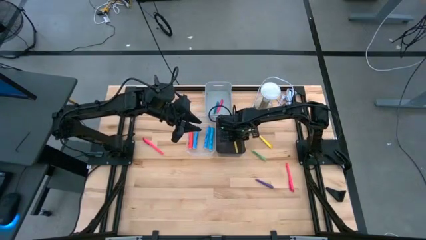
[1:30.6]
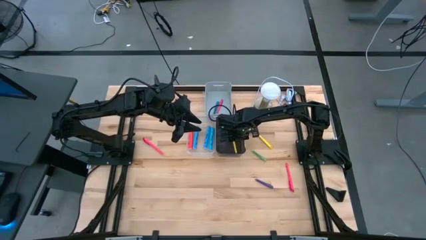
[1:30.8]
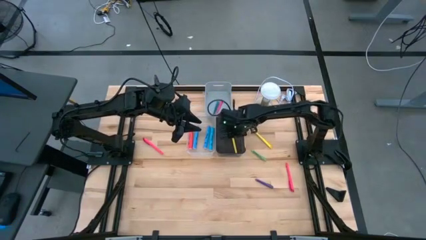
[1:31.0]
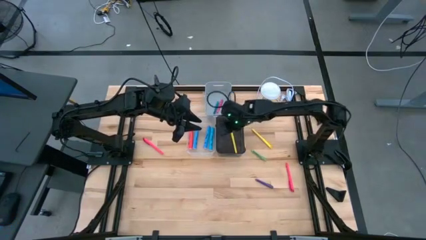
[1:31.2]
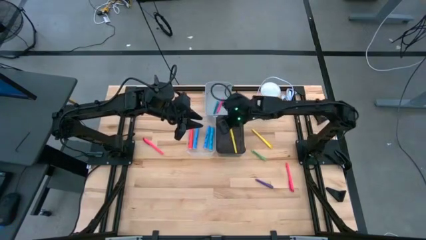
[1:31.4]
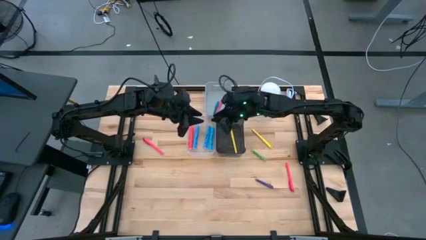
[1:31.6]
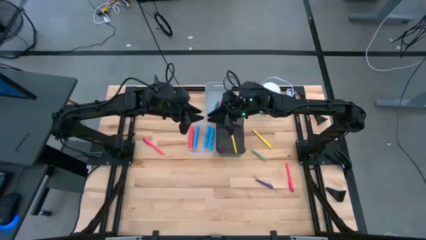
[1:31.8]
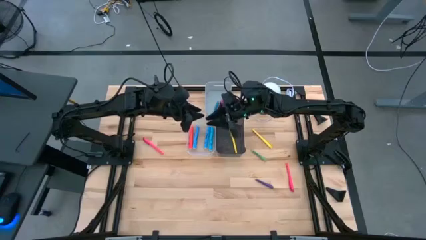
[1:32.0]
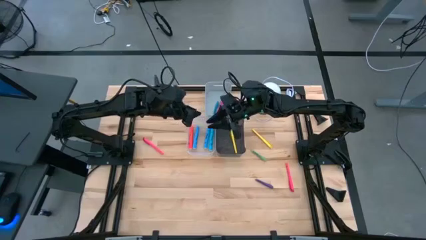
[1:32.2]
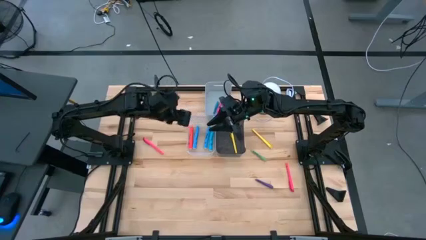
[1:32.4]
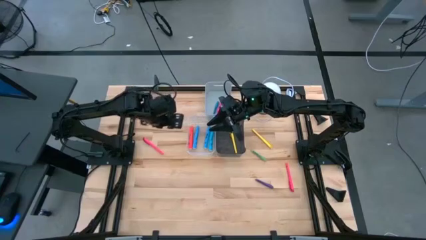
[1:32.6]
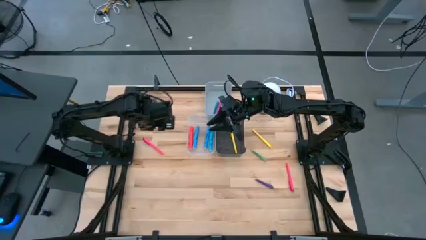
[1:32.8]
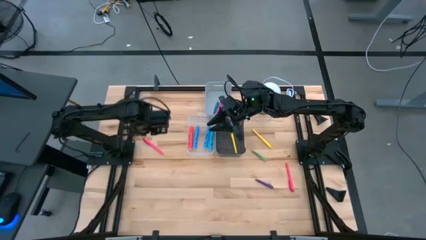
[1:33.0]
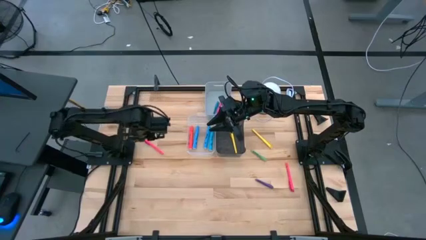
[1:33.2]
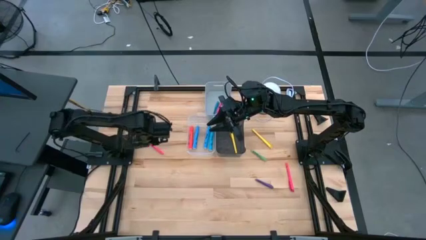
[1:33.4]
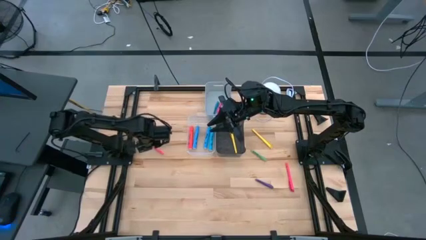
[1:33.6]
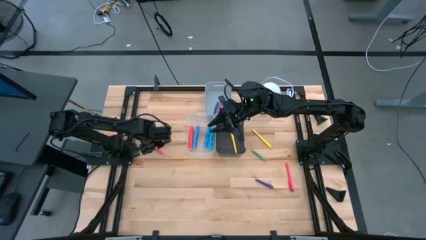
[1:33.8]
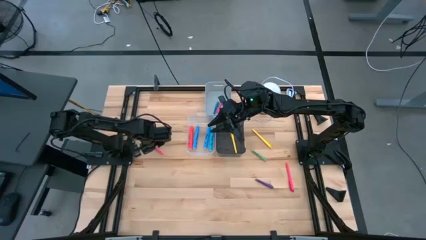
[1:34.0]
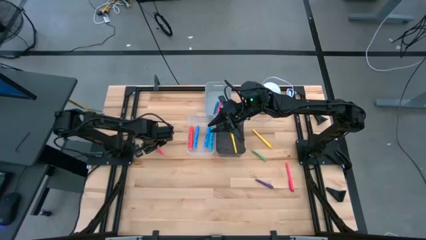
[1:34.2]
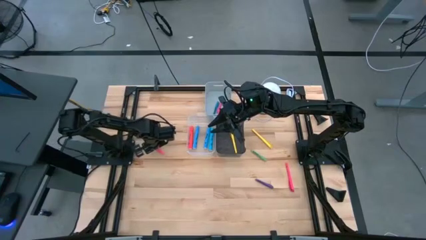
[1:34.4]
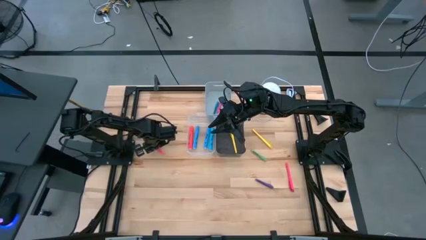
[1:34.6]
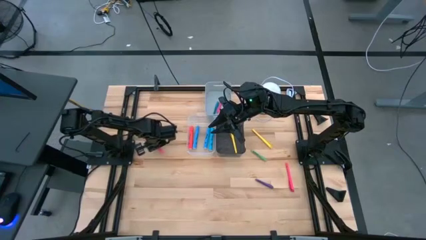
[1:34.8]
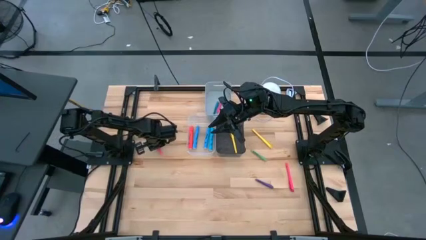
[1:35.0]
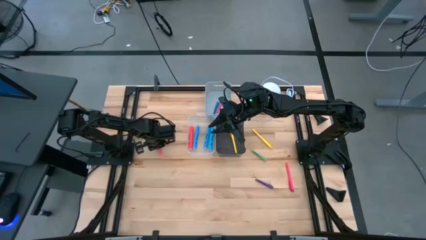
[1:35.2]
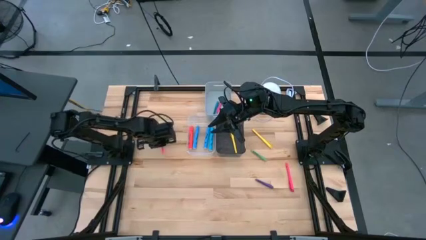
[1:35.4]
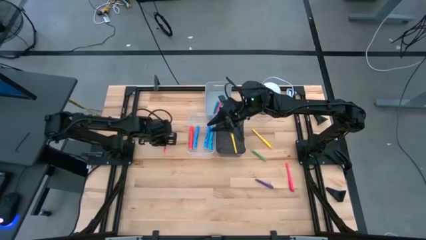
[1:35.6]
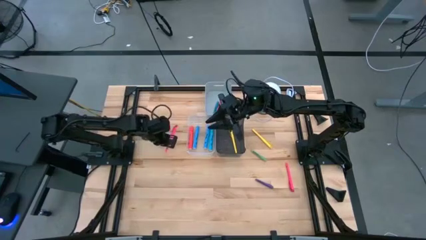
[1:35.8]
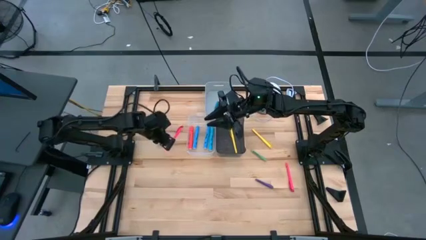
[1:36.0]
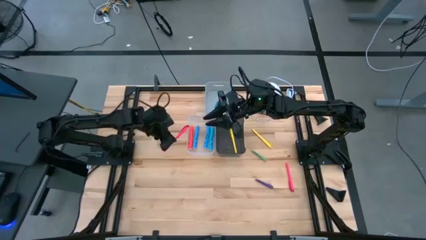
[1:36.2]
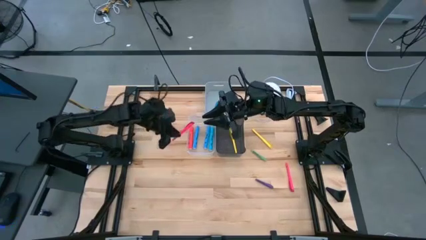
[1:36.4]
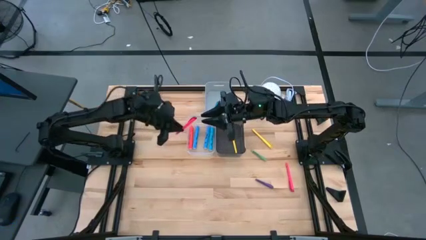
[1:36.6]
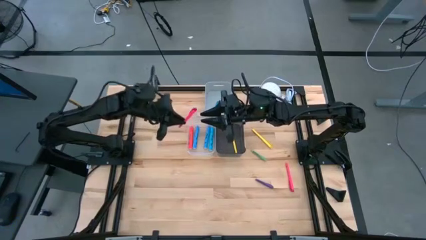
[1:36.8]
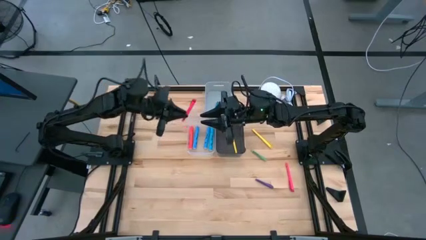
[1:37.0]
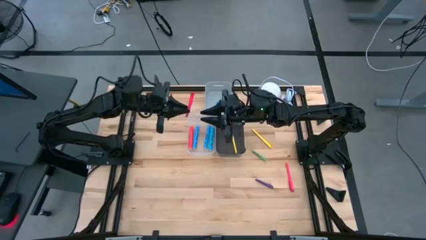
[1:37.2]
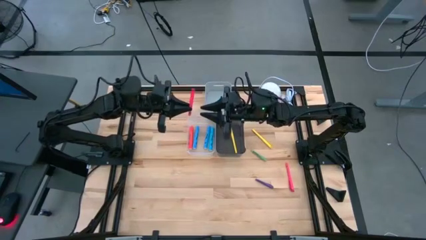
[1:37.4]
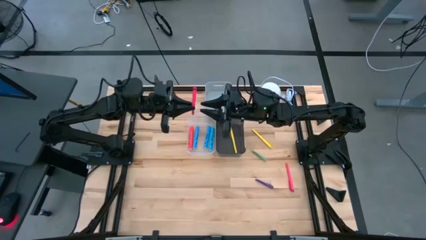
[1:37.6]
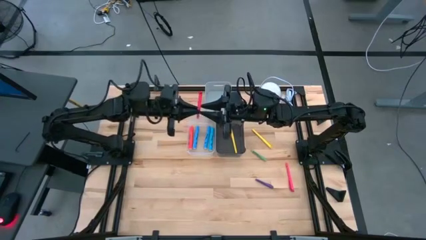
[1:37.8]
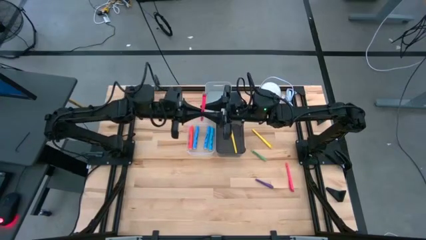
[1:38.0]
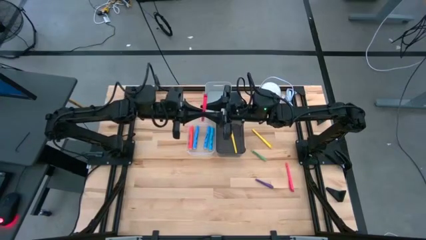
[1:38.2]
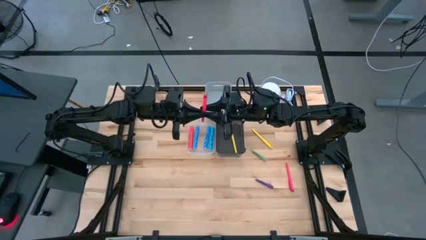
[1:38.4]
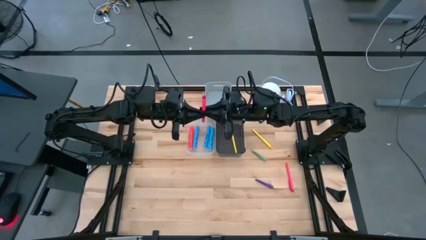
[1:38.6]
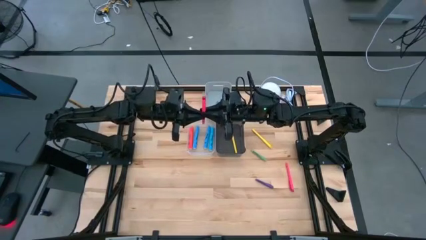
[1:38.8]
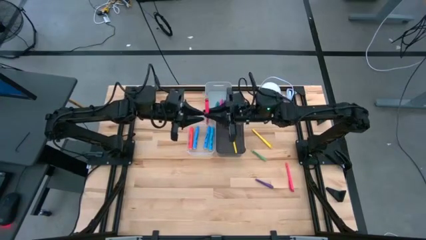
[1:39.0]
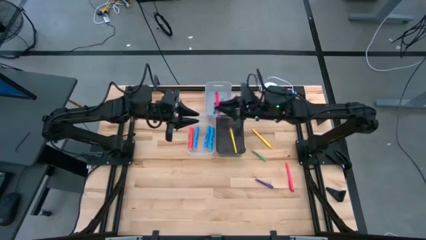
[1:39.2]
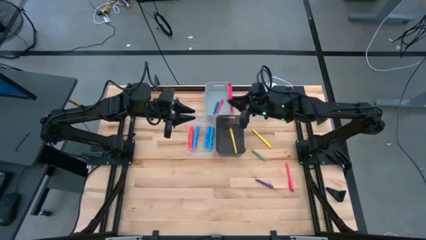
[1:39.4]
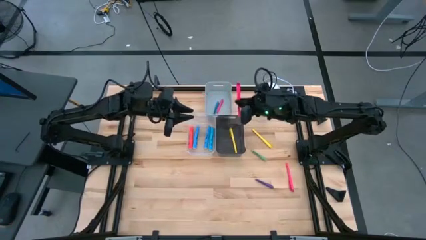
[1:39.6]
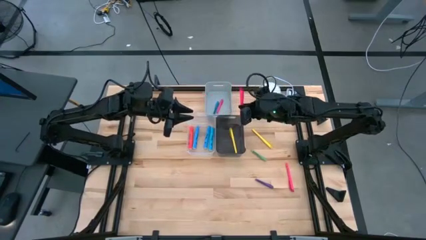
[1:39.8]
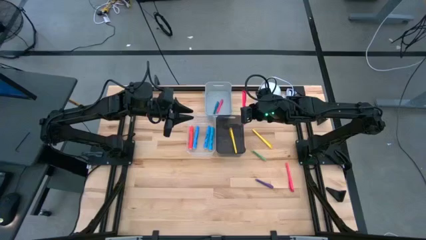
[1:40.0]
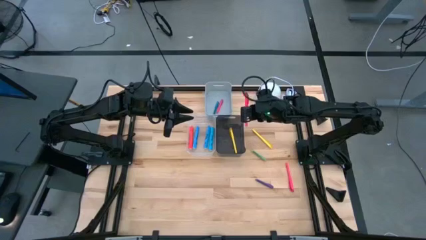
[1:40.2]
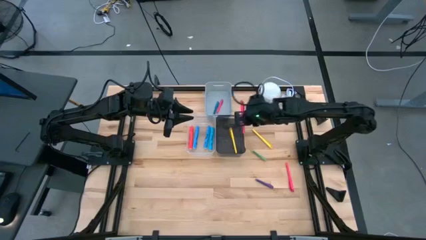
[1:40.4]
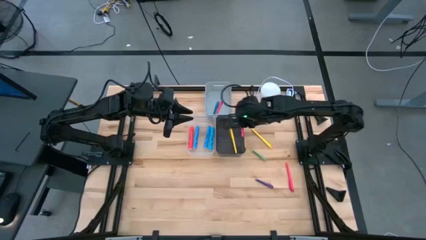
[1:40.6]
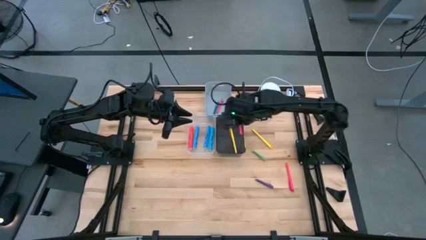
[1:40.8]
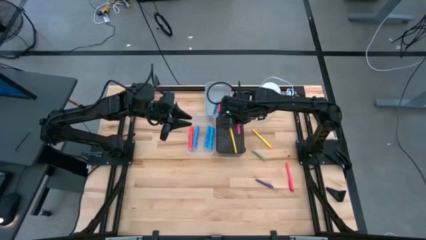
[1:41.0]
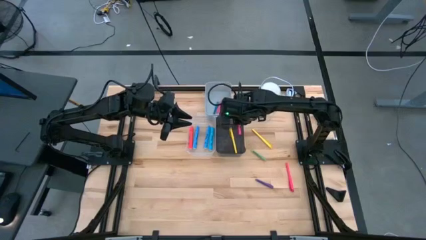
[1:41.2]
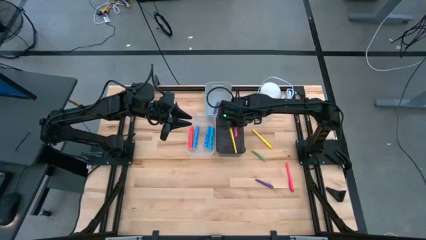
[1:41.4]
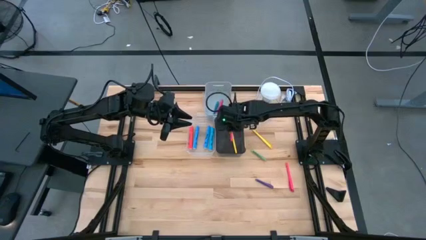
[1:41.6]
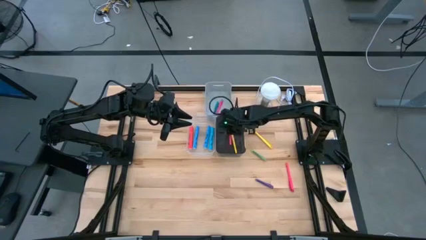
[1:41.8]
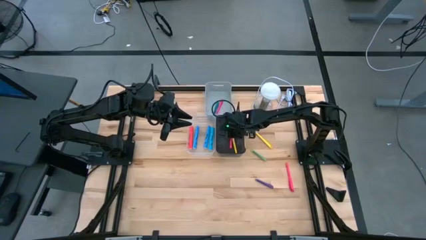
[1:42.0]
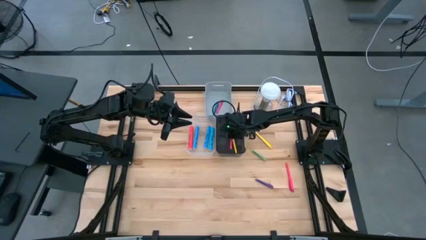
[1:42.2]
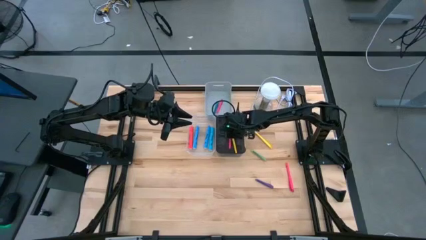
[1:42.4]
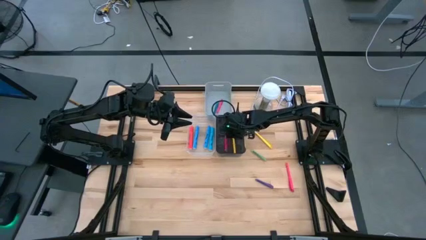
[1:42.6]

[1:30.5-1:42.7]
Task: Pick & Place Markers
Put the left pink marker pen into the black bin
